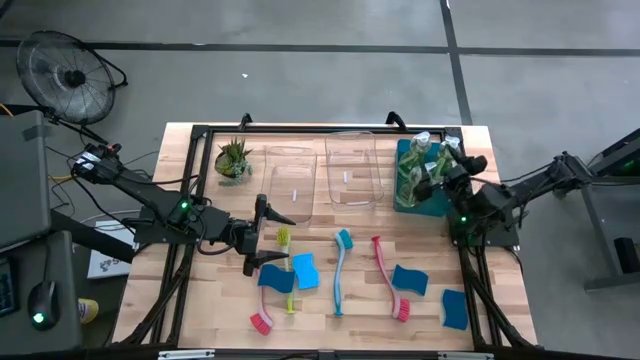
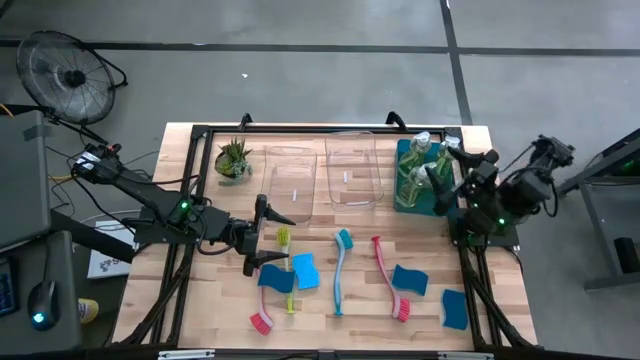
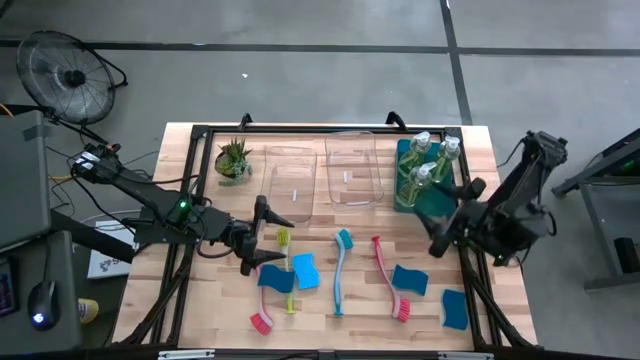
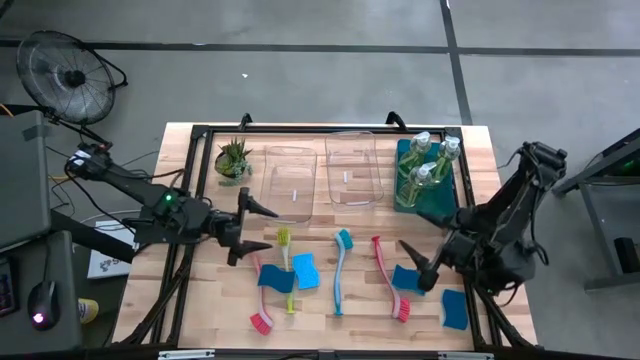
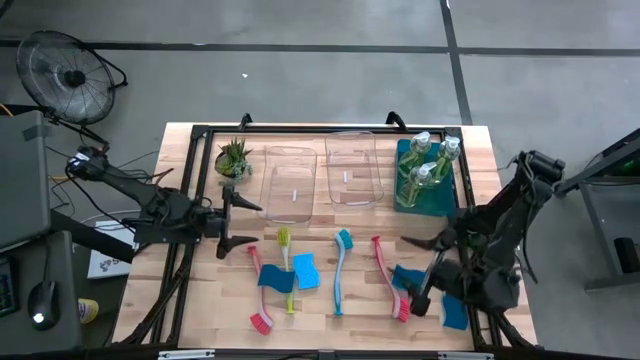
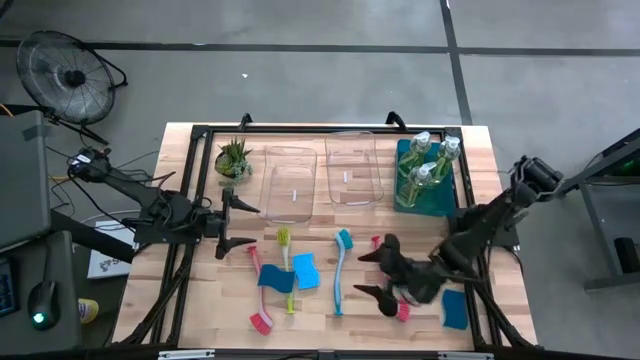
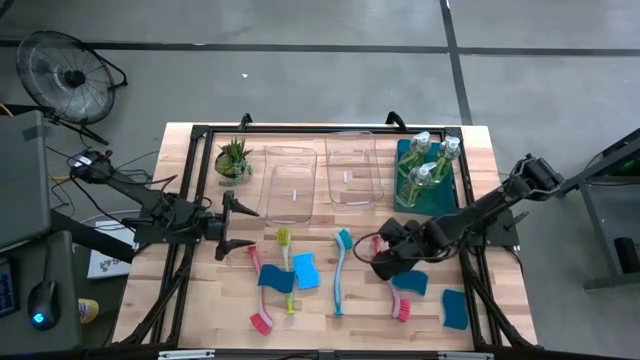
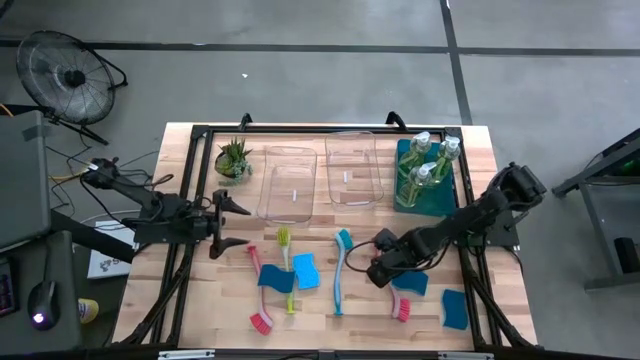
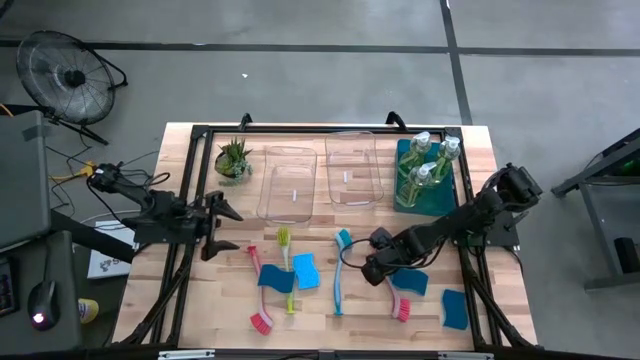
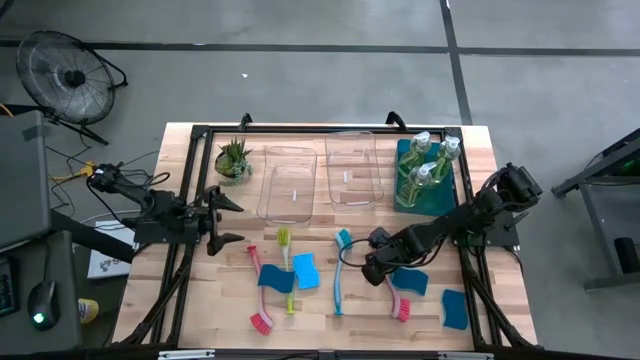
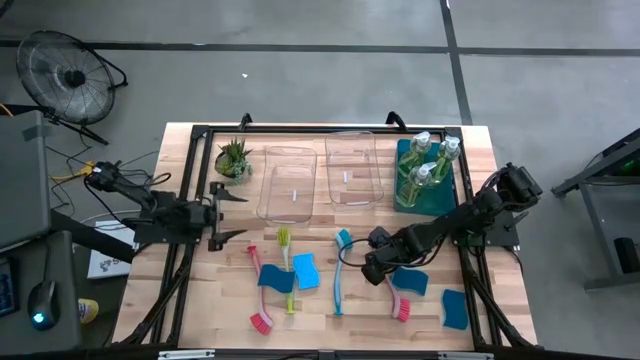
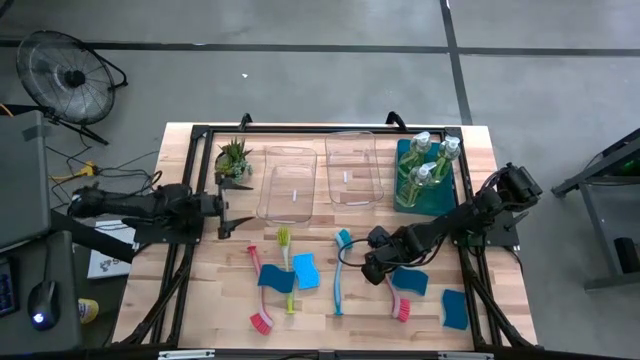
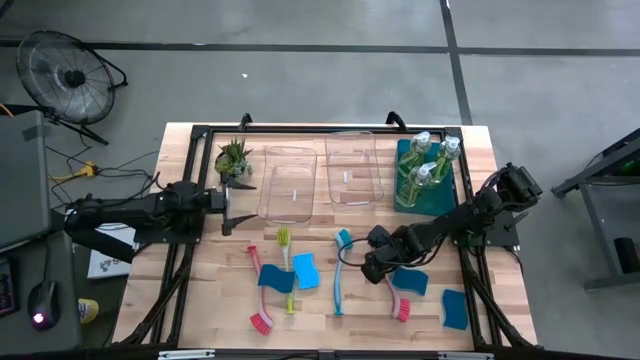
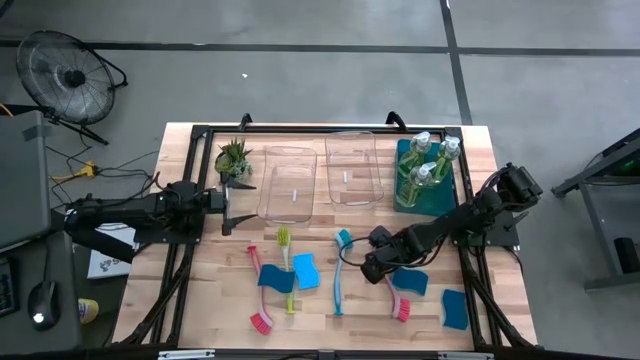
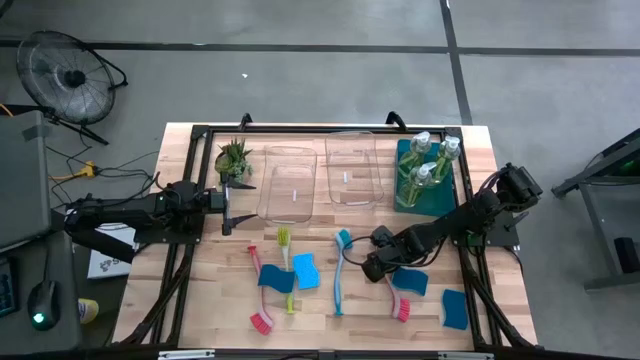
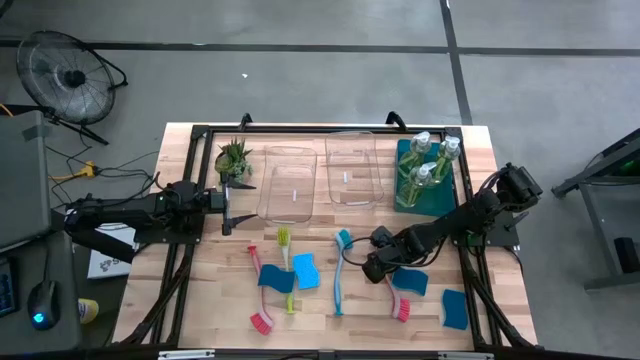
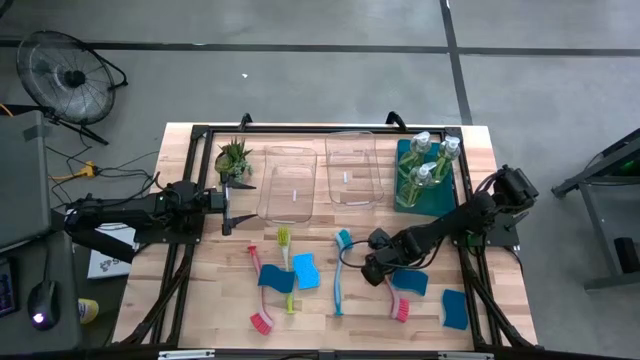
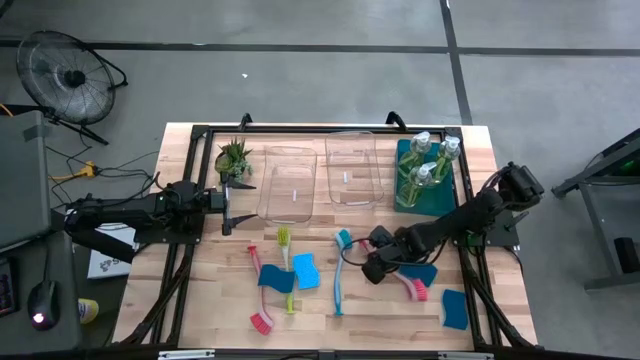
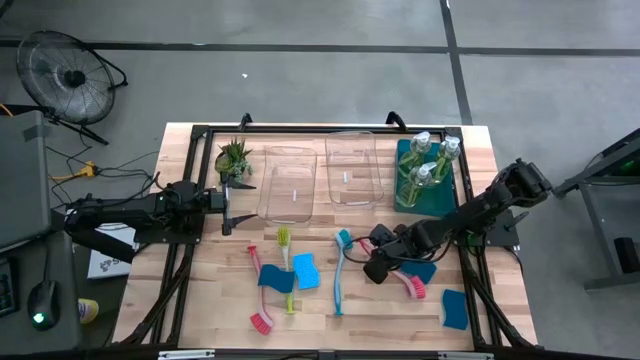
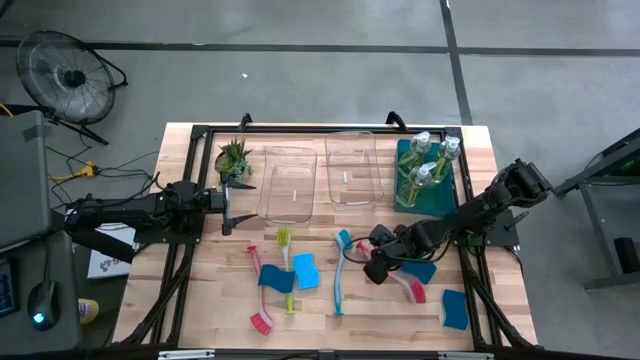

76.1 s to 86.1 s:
Task: Pick & Place Kitchen Sink Supplies
Put the right red dishwashing brush into the right transparent bin

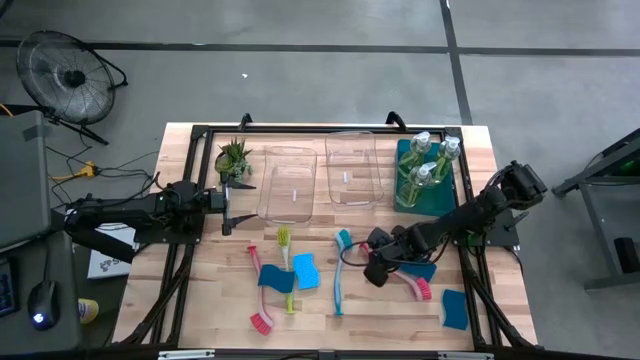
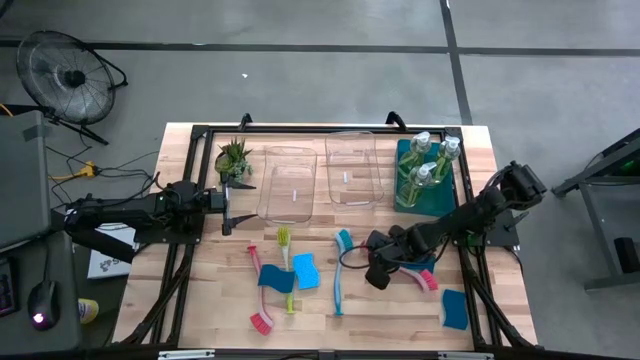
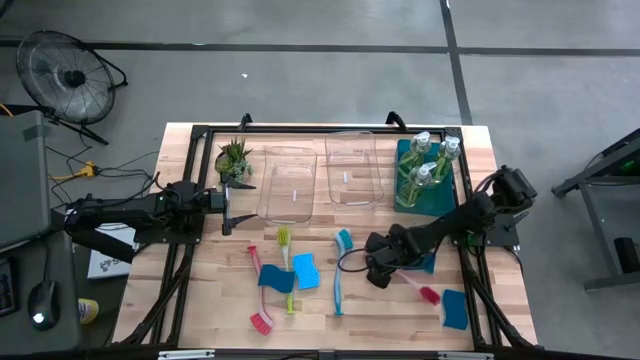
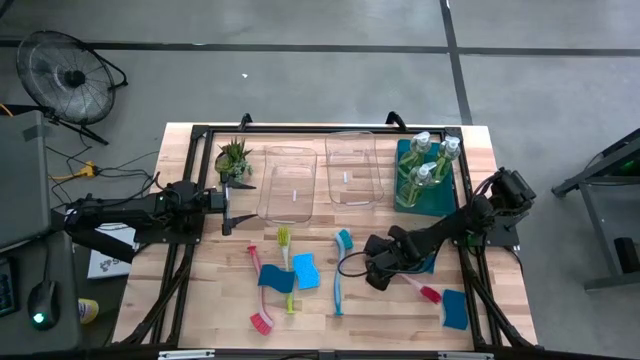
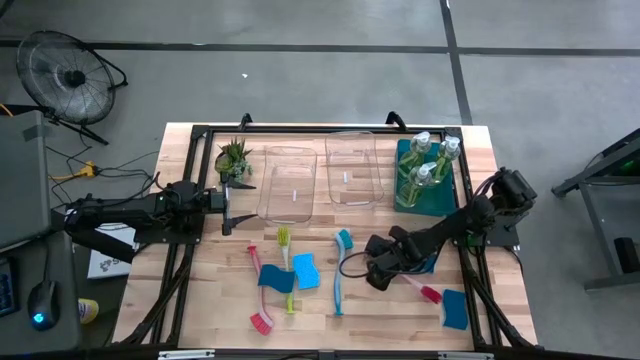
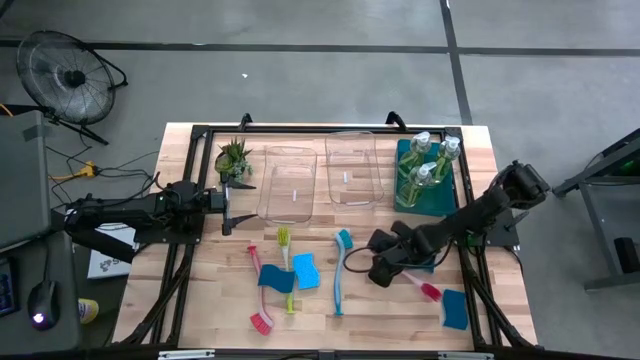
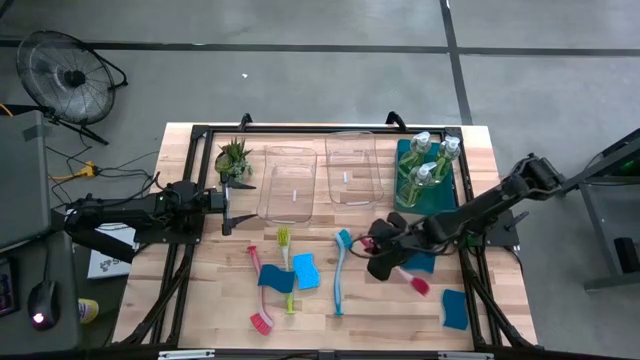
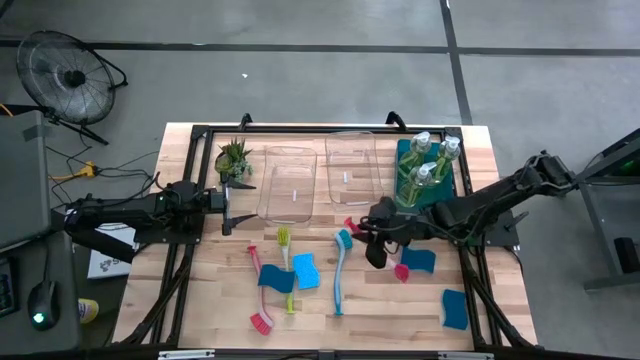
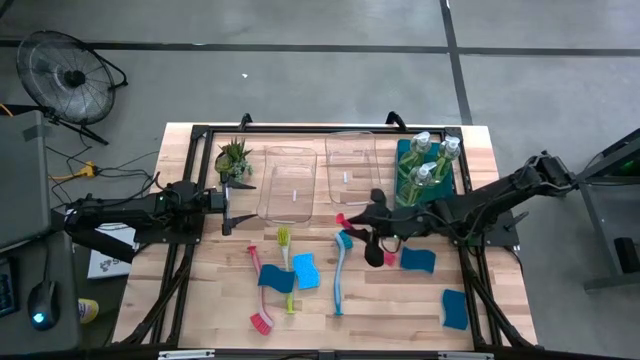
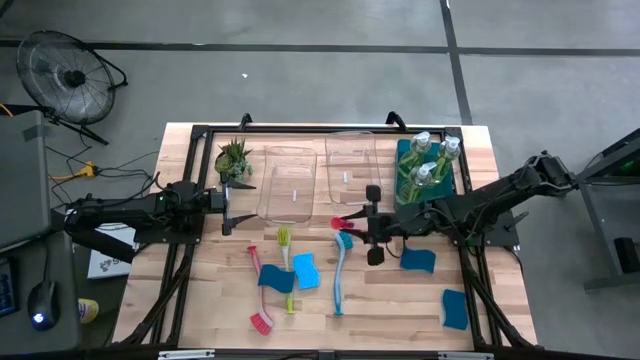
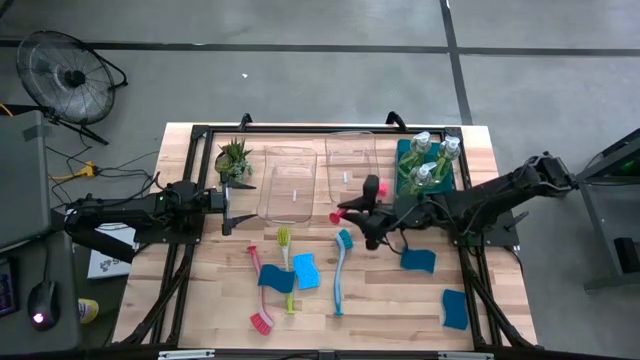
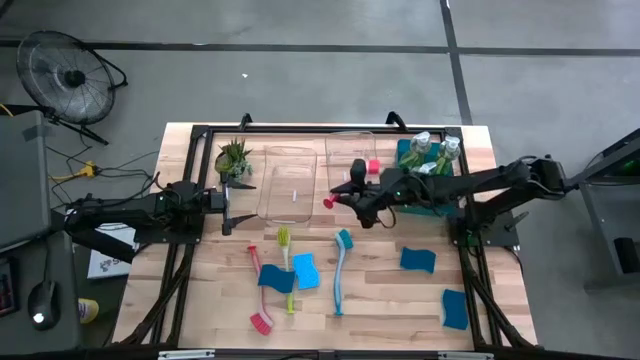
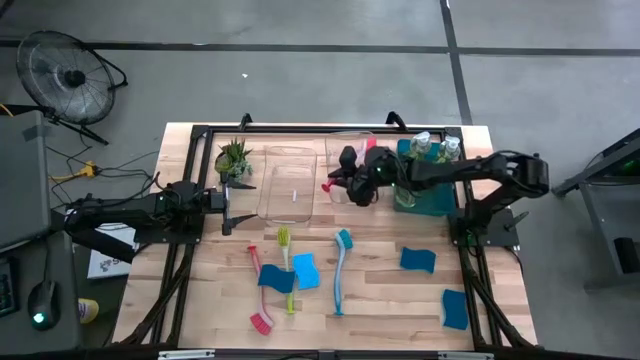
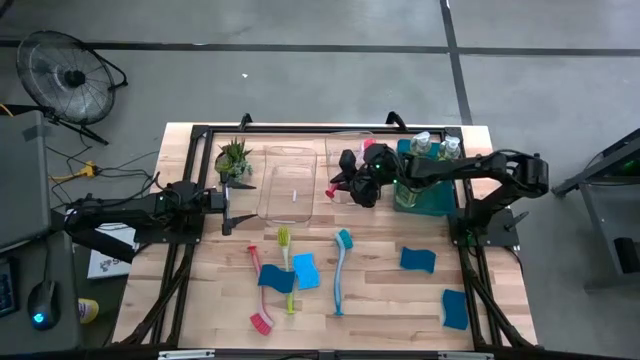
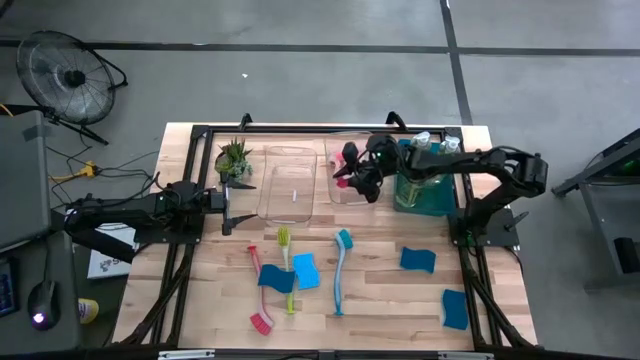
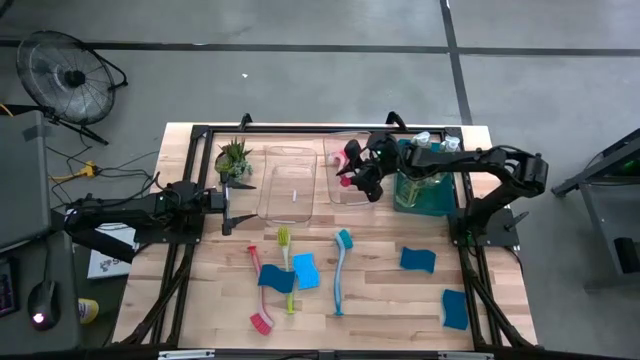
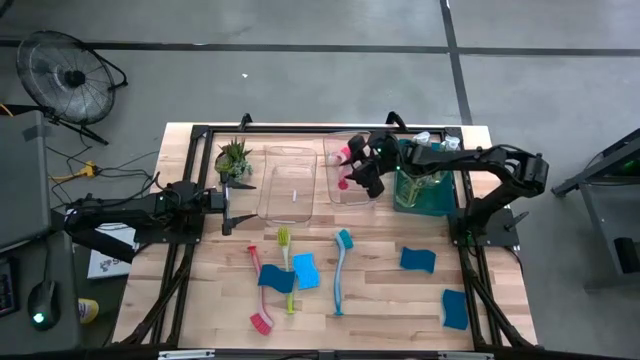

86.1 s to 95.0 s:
Put the right red dishwashing brush into the right transparent bin

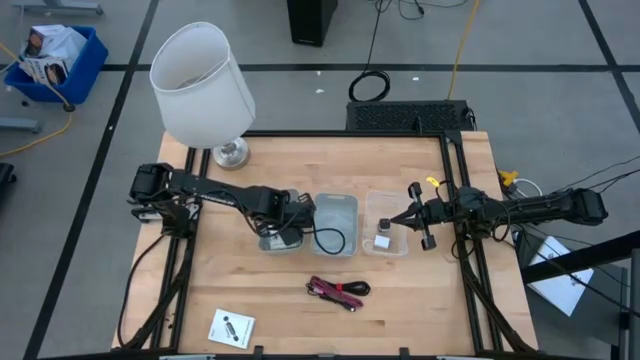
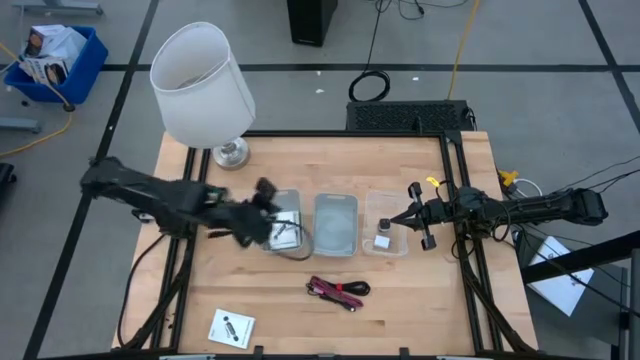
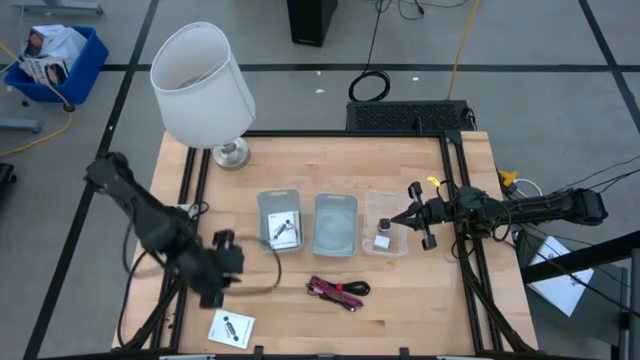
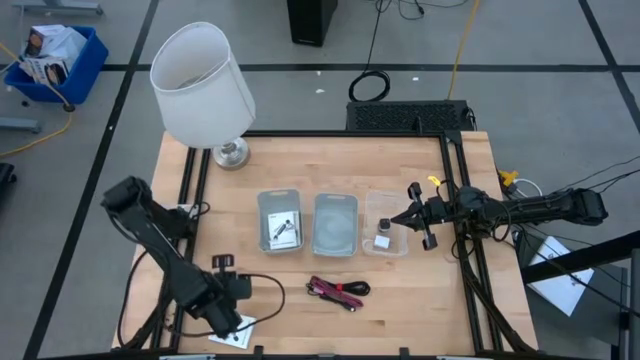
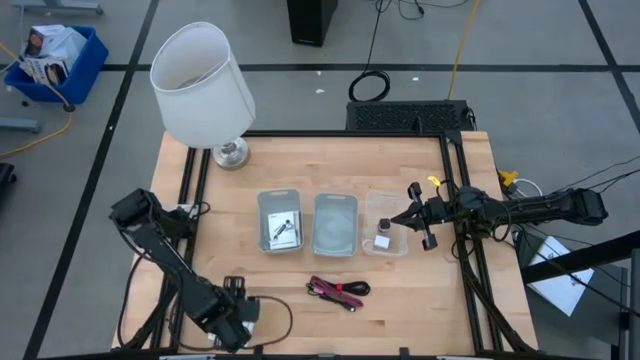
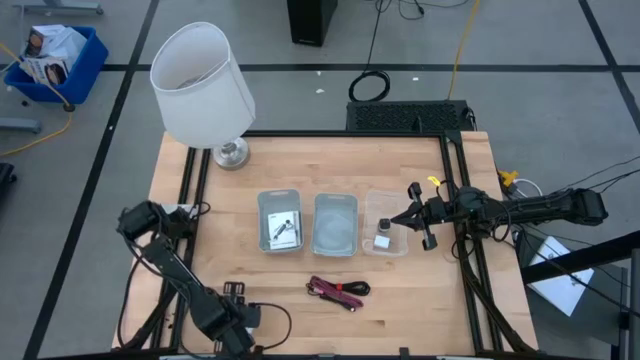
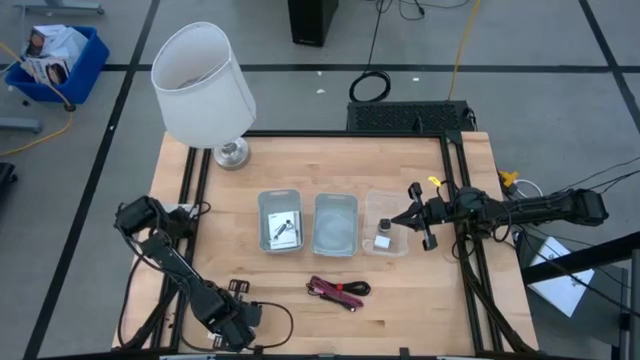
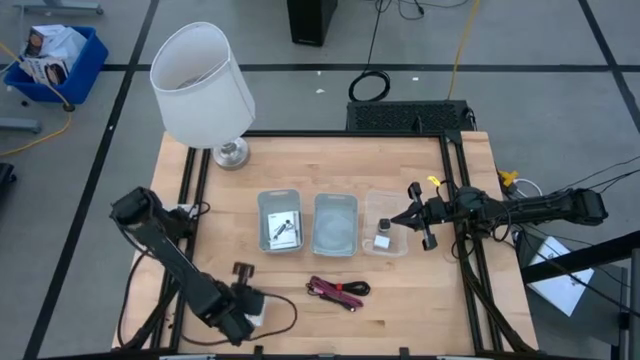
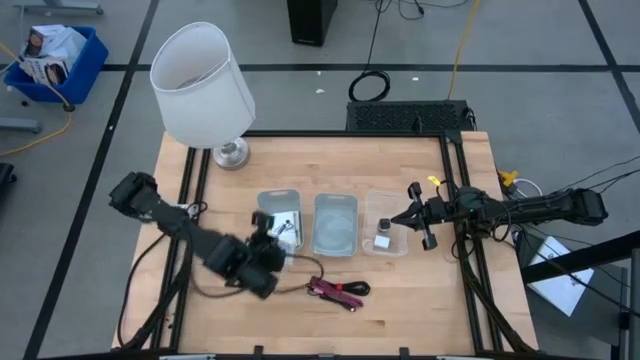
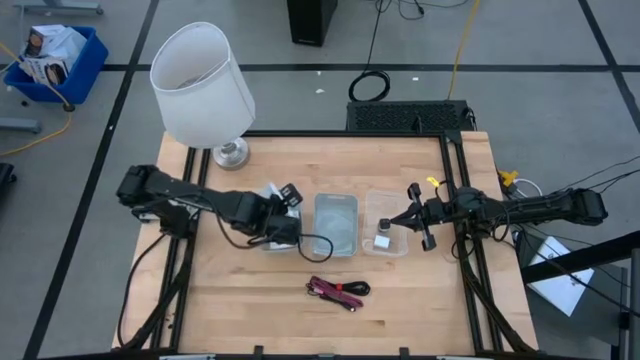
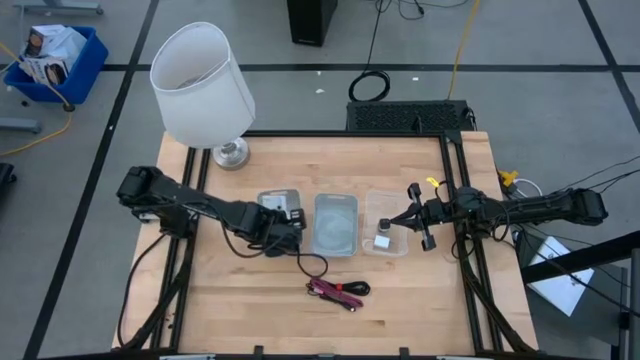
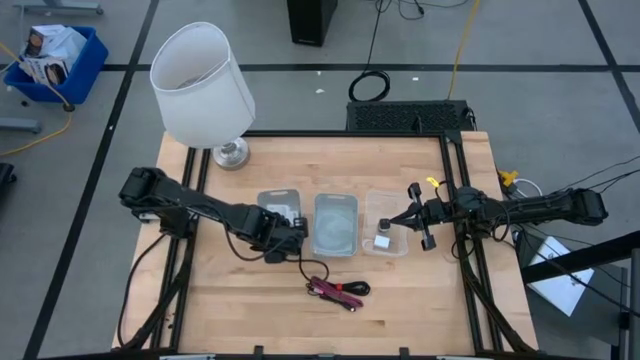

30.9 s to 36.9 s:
Task: Pick and place items into bin
Put the card reader box into the left gray bin
